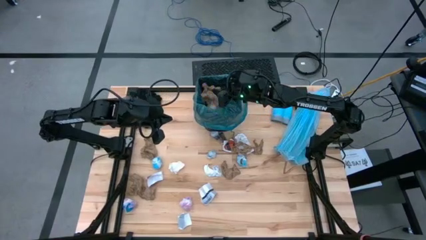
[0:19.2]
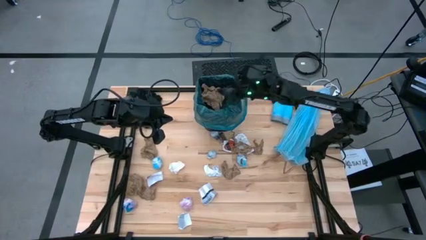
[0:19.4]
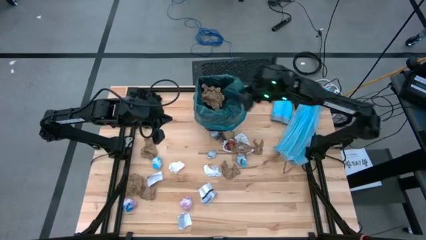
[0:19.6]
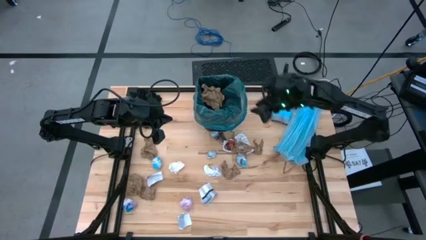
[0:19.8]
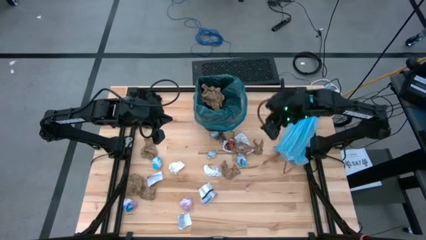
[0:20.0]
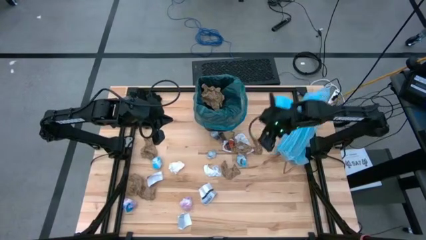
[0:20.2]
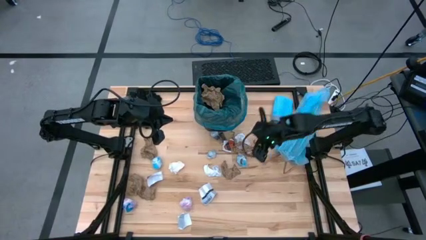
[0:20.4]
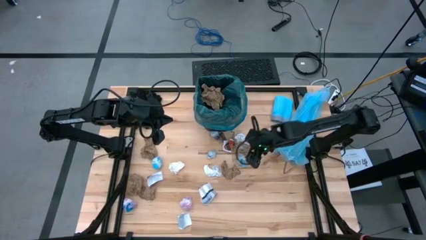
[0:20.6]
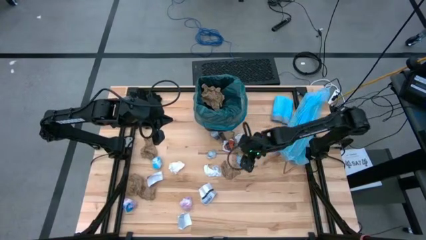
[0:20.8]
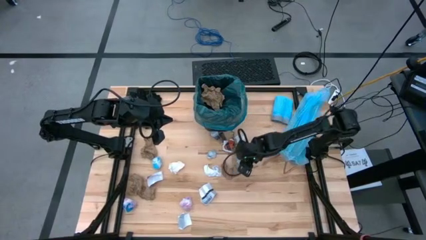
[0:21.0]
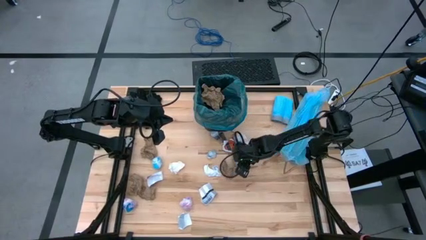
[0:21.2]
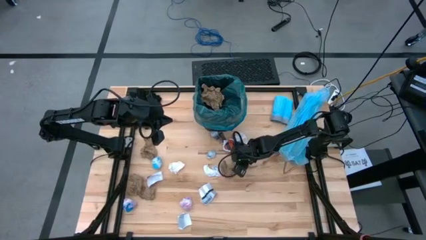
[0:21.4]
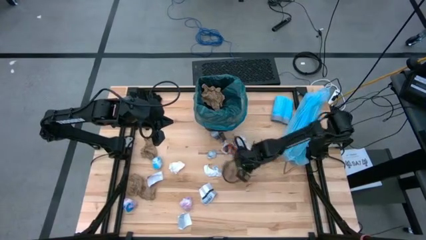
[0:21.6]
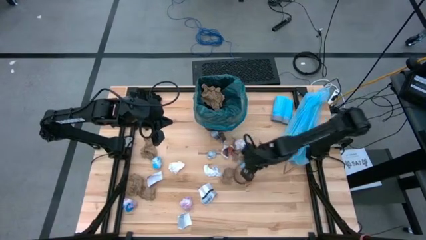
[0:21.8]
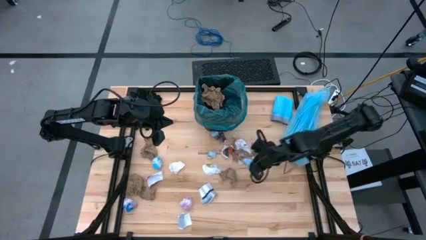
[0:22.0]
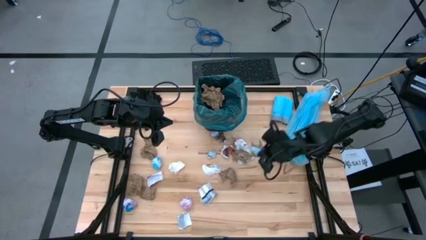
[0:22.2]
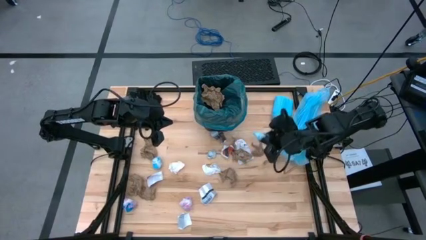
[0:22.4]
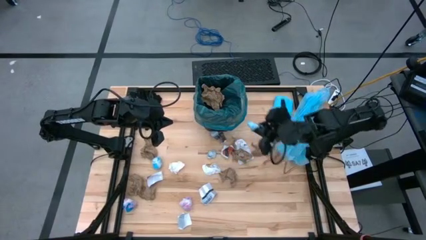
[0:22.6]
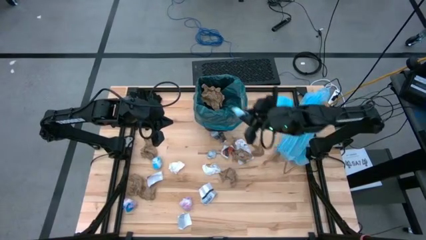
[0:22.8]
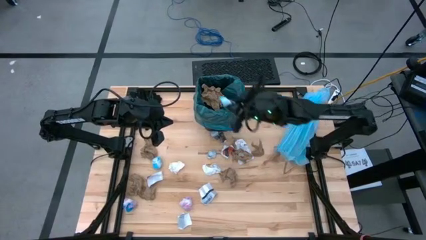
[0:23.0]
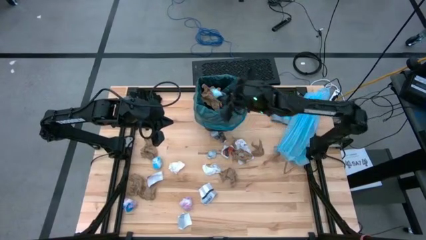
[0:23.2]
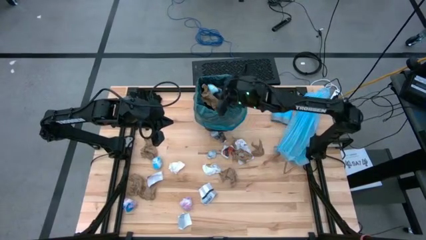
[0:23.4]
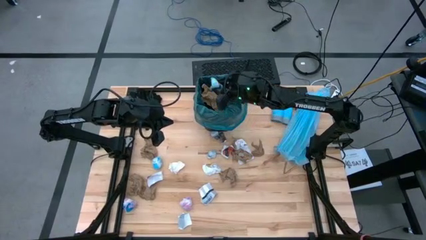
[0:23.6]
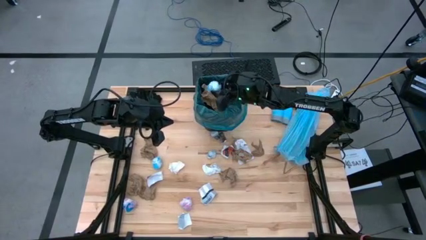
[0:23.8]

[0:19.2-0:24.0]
Task: place trash/remove bag and relplace
Put the blue plastic into the trash bin

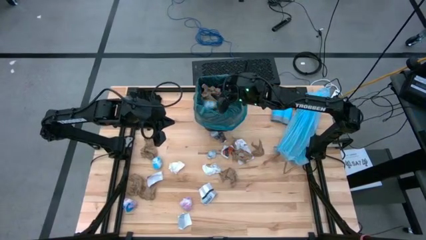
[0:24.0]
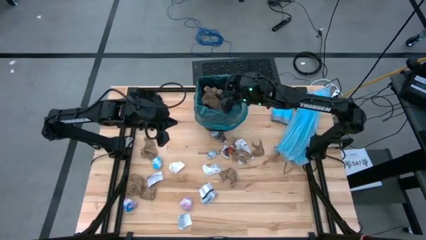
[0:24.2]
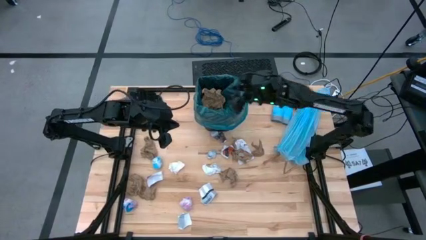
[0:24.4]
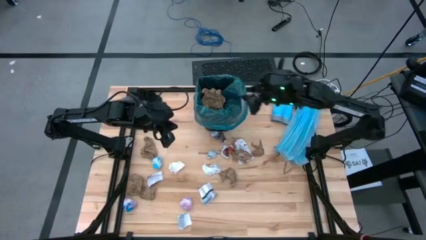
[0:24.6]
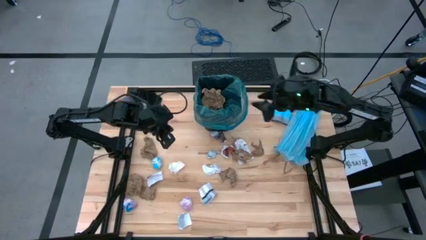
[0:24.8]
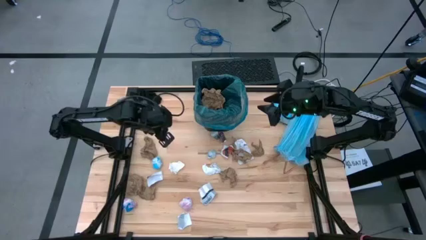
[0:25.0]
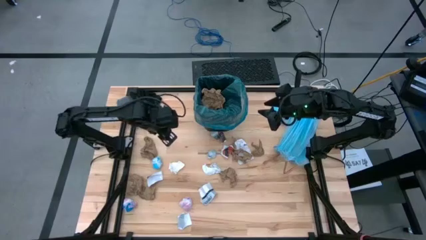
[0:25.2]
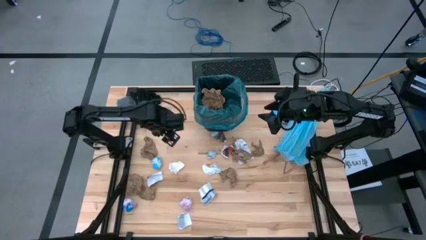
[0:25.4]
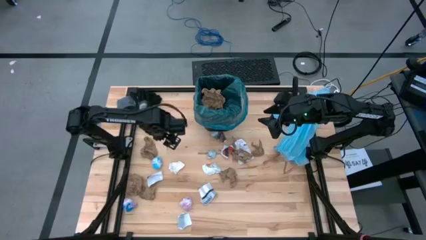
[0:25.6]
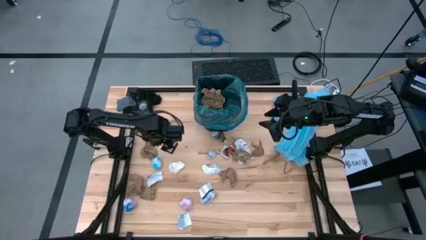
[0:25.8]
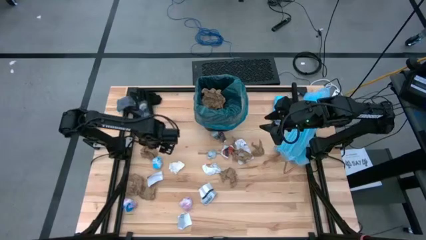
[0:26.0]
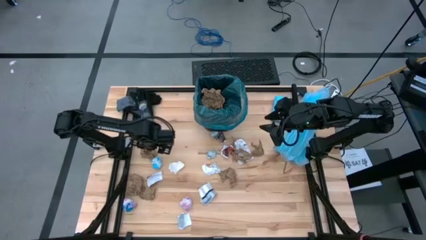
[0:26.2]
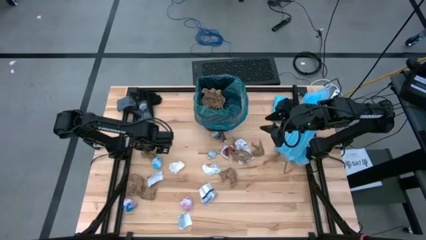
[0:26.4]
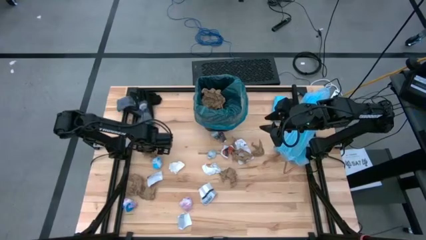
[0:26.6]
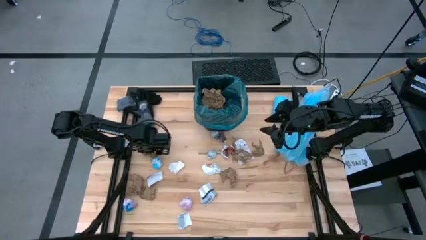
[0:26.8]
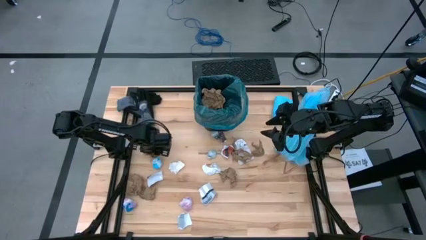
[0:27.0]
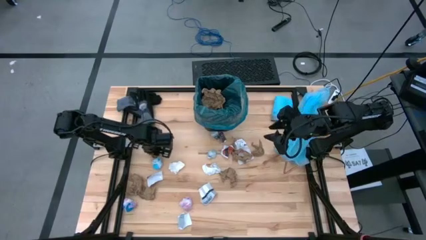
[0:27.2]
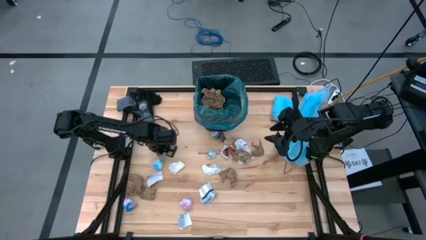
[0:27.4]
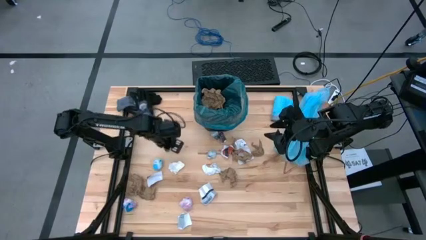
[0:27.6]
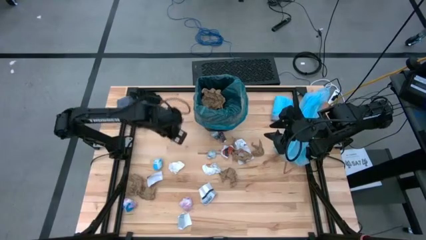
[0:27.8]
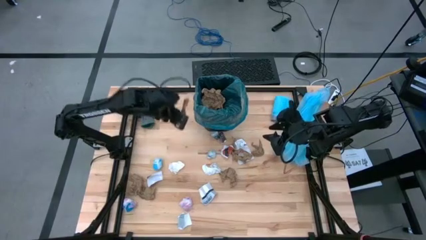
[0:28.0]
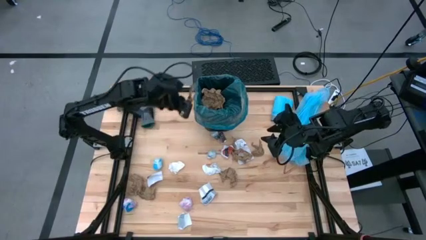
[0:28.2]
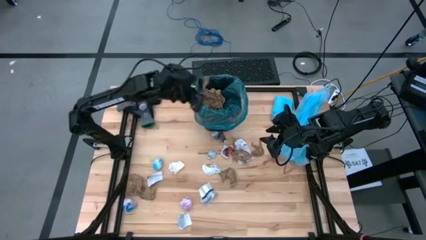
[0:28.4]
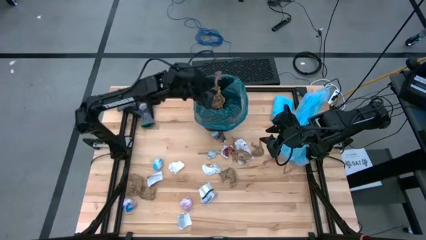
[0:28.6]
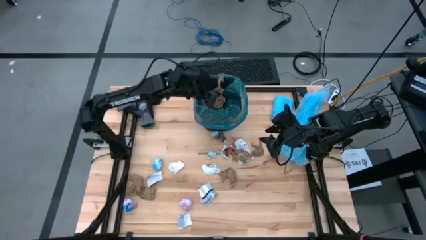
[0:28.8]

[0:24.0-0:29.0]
Put the brown napkin into the trash bin

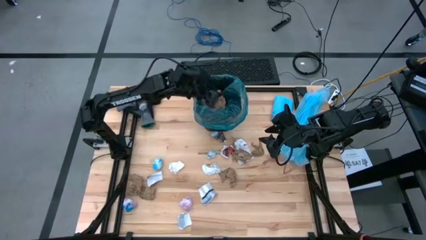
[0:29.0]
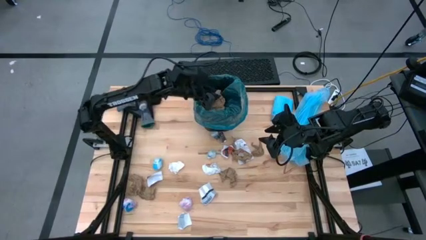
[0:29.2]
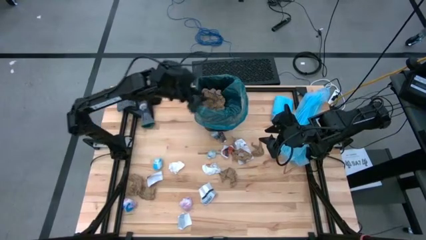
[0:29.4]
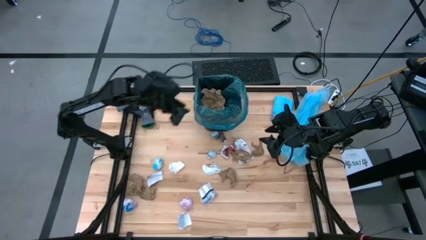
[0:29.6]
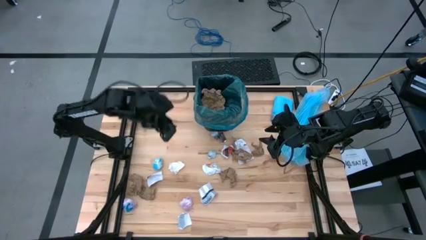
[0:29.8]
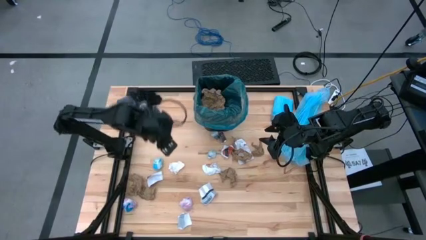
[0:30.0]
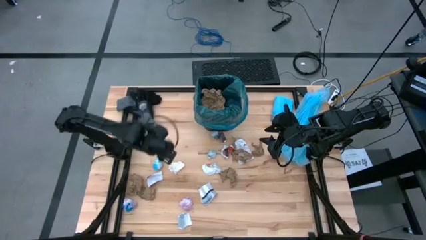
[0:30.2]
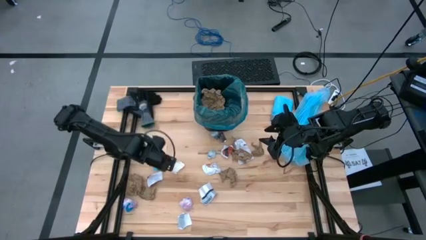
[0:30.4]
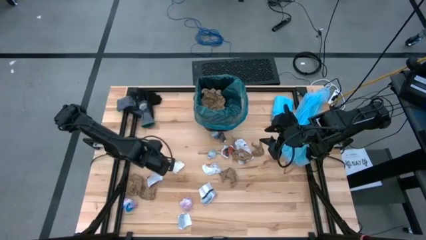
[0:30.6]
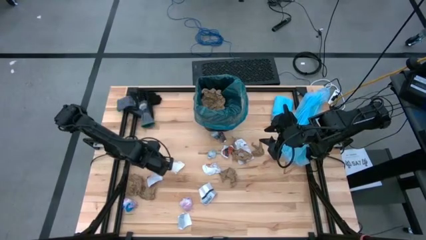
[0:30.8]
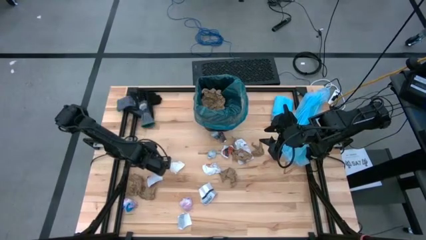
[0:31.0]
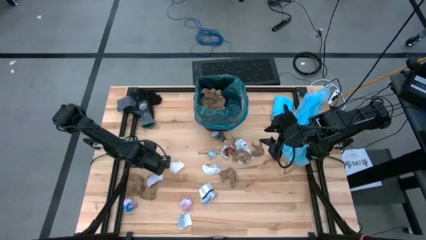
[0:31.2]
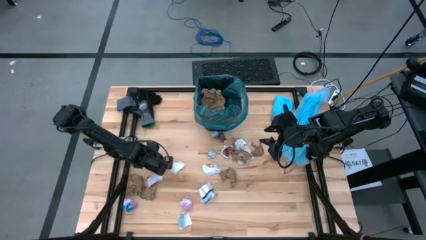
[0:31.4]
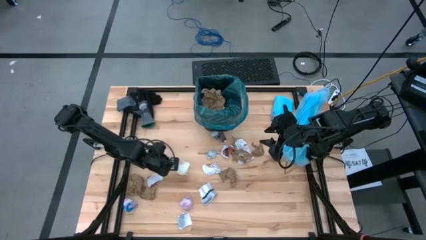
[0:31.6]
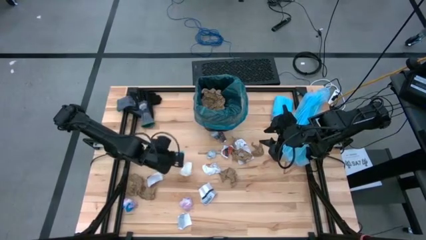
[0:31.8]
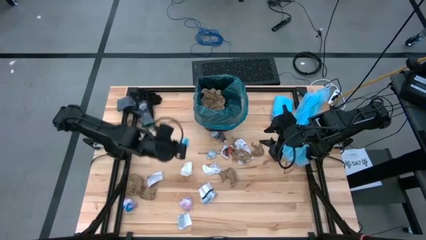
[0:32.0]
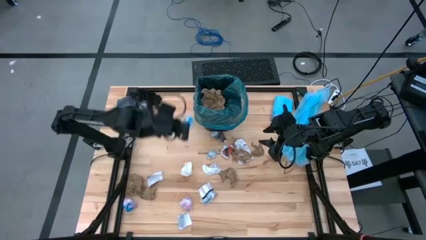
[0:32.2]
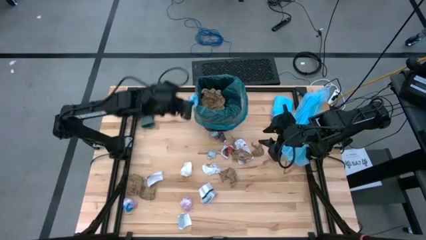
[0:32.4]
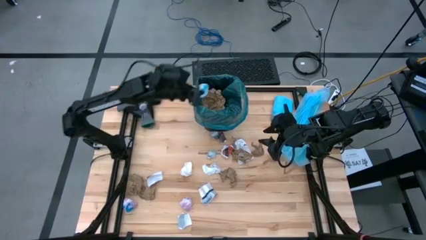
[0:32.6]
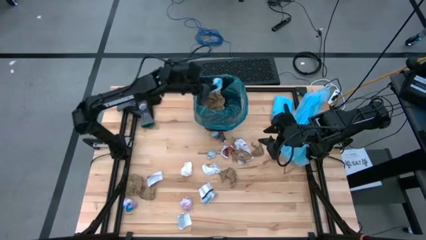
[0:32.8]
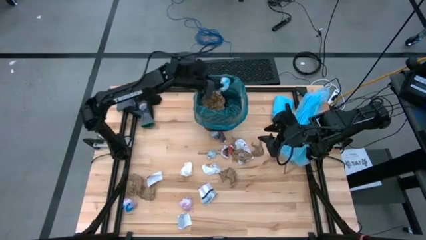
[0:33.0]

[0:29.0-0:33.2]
Put the blue plastic into the trash bin

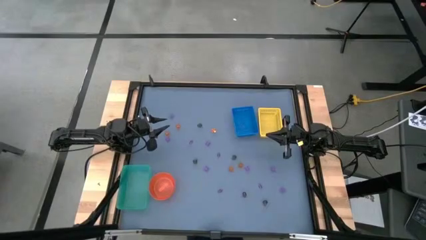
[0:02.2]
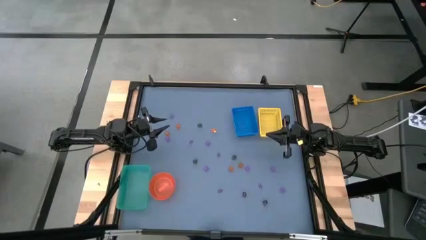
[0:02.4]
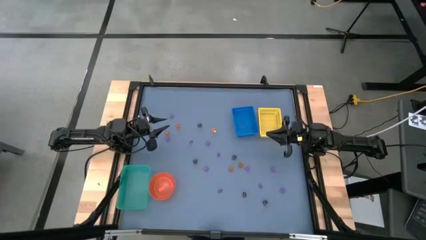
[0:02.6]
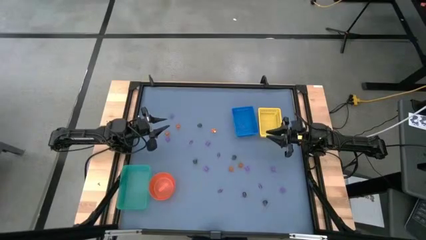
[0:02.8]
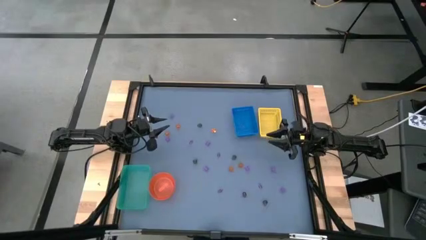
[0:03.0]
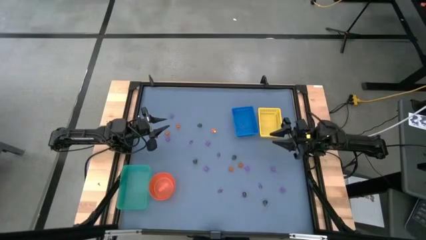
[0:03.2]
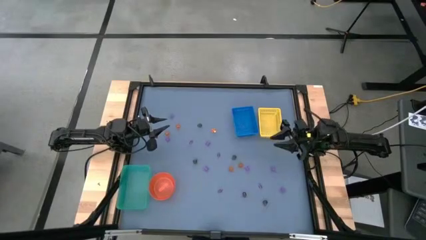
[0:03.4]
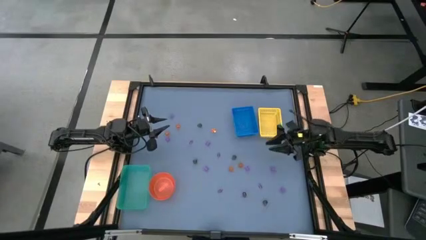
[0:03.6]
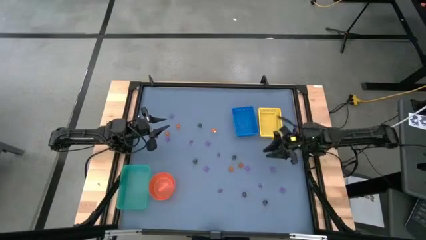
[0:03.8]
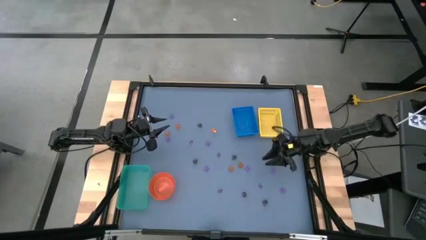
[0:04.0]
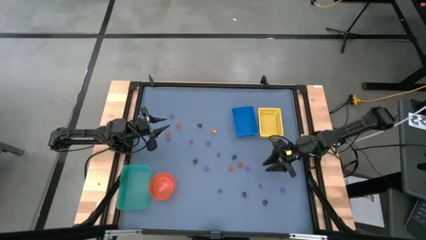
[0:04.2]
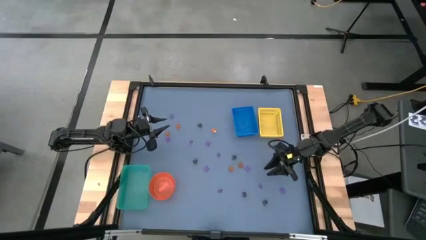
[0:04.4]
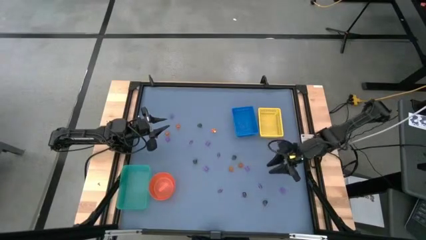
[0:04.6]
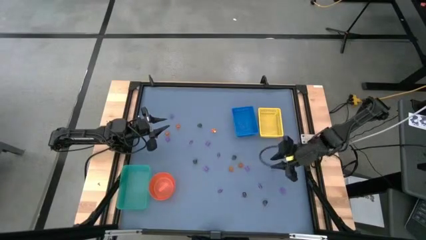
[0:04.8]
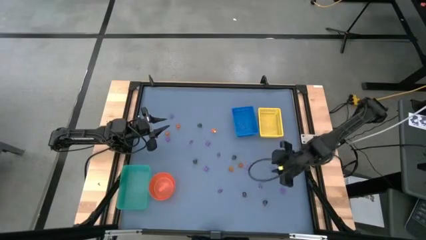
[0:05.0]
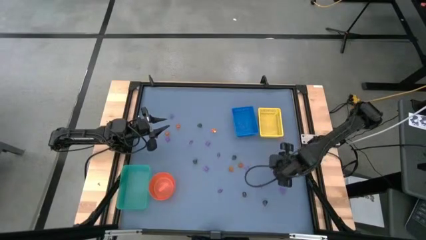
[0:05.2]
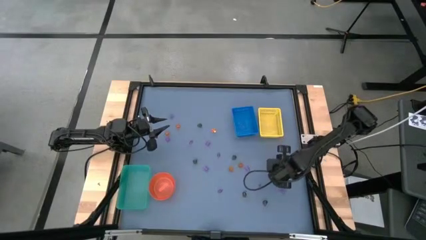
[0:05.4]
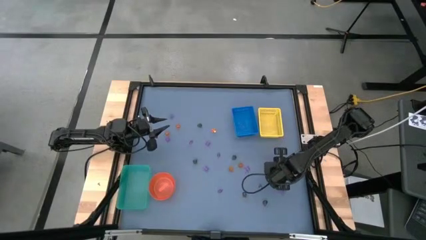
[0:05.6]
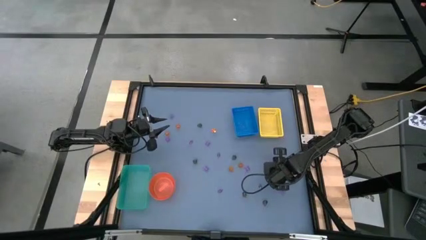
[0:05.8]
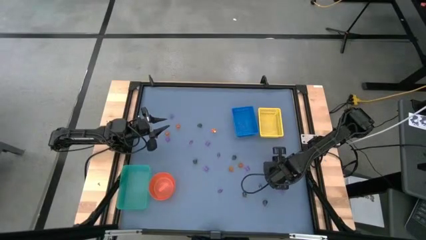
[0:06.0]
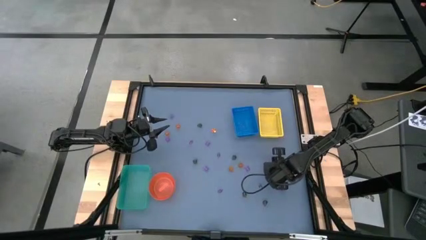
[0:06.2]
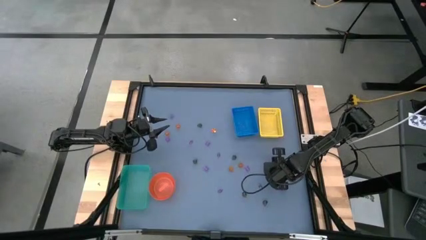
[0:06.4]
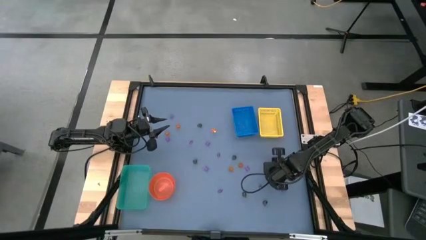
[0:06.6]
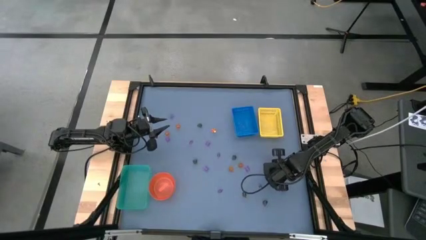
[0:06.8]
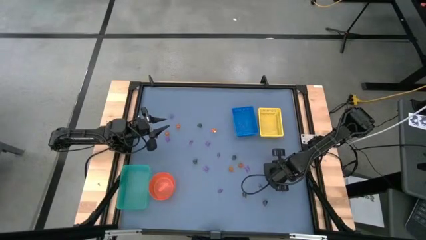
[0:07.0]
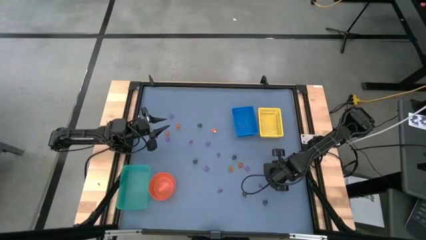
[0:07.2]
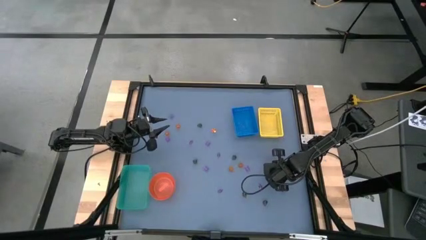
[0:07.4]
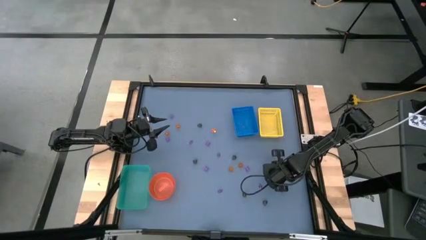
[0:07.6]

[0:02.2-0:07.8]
Task: Sort Halloween decoration
Put the violet spider toy into the blue box
